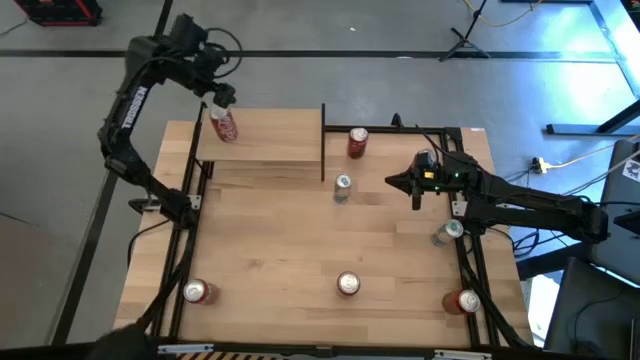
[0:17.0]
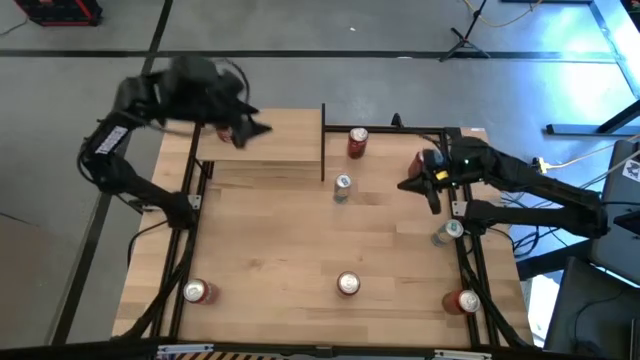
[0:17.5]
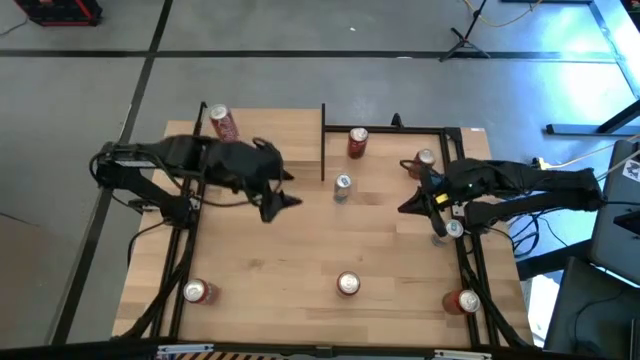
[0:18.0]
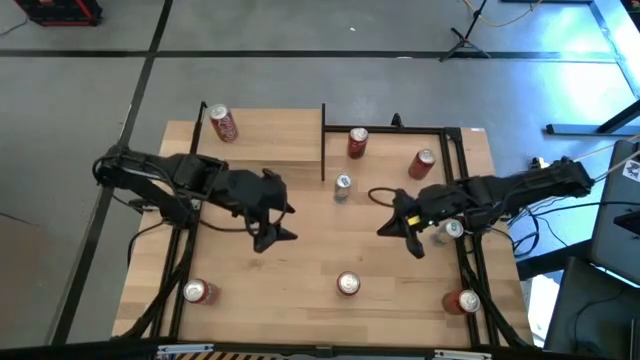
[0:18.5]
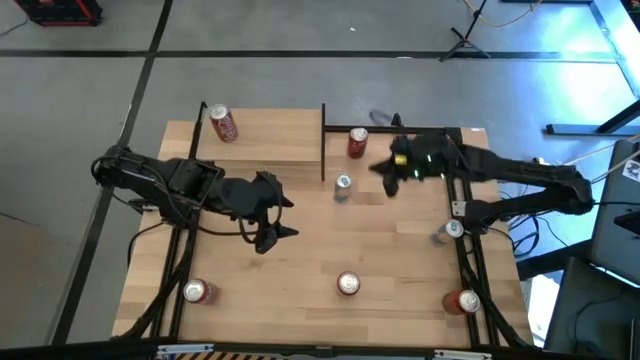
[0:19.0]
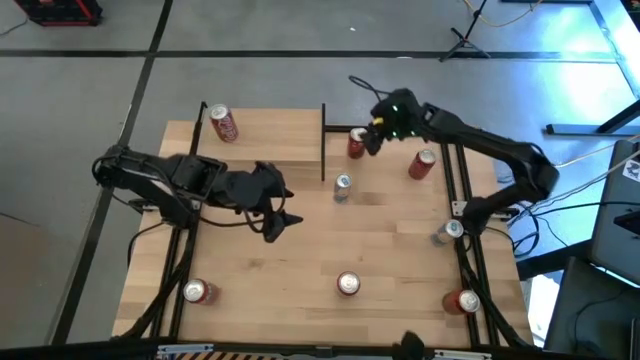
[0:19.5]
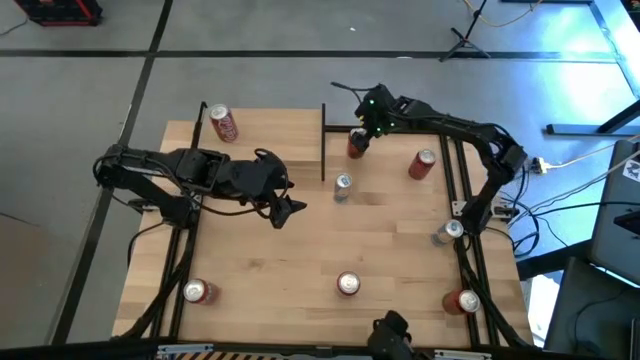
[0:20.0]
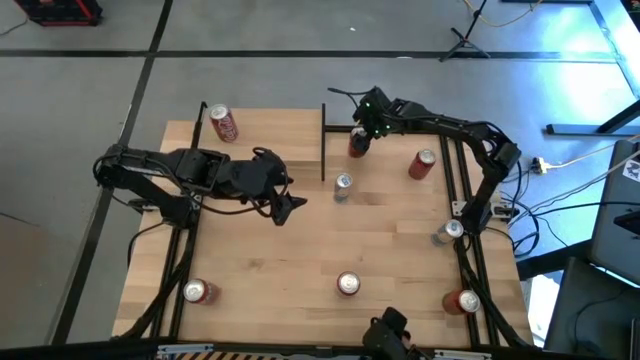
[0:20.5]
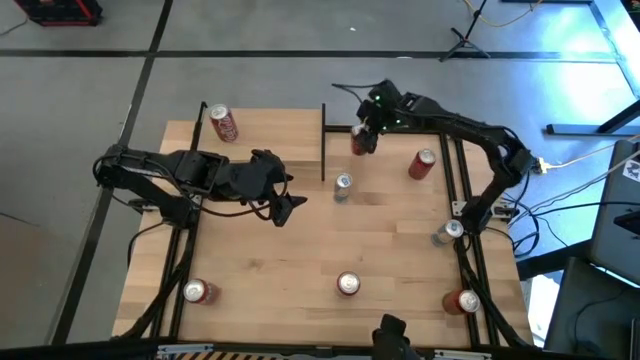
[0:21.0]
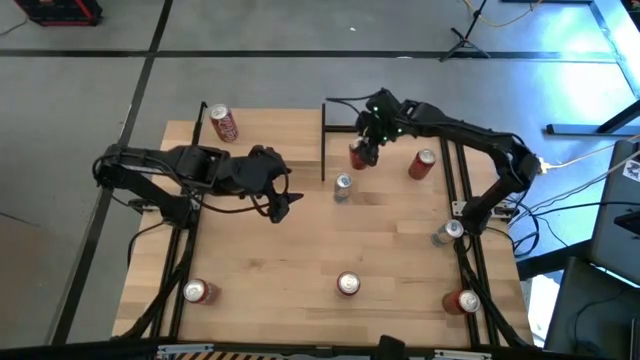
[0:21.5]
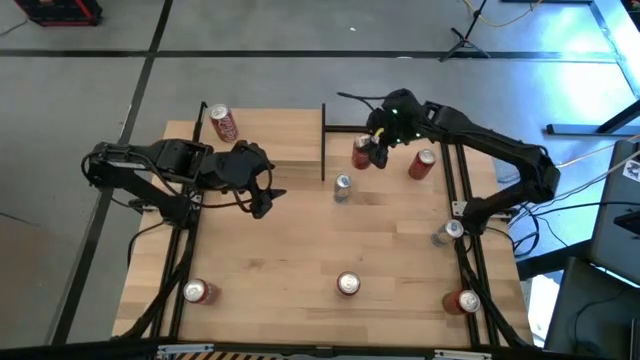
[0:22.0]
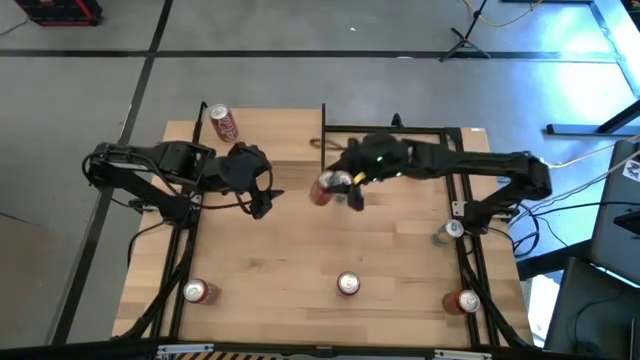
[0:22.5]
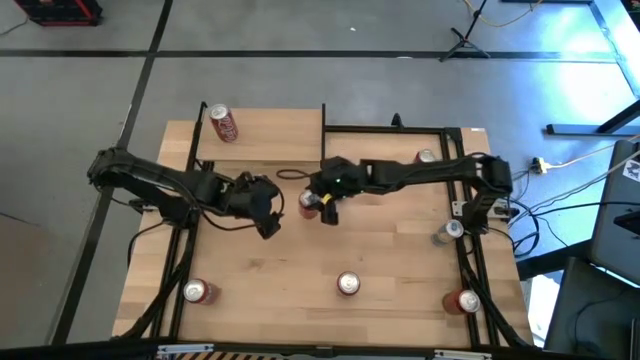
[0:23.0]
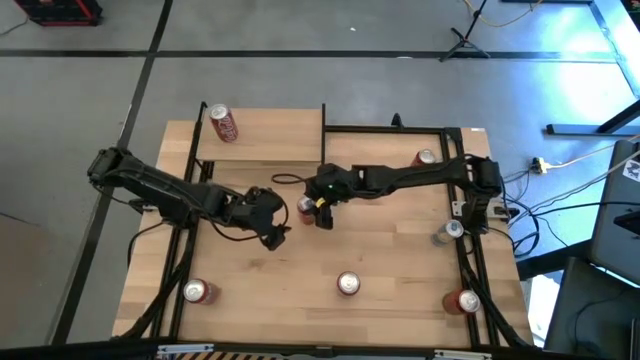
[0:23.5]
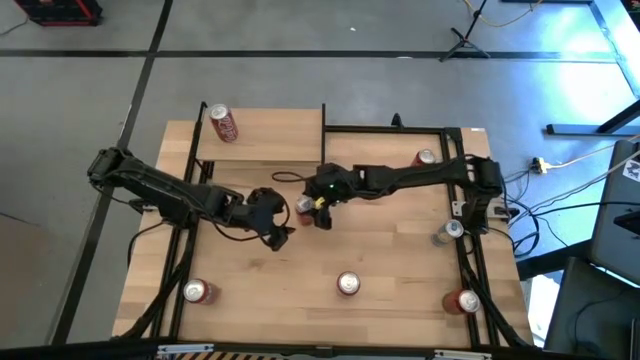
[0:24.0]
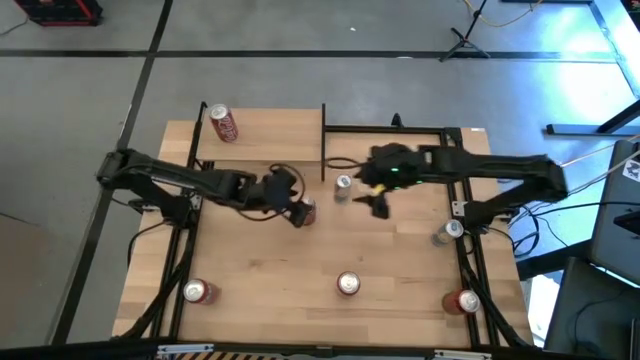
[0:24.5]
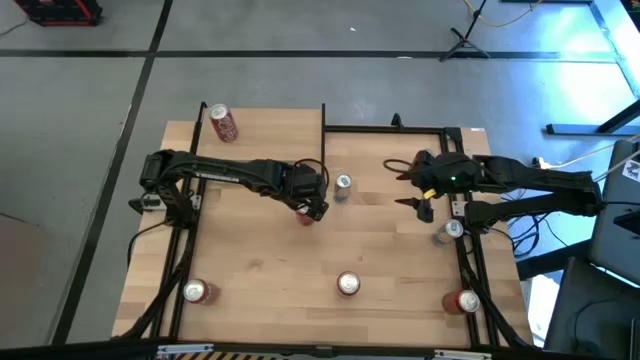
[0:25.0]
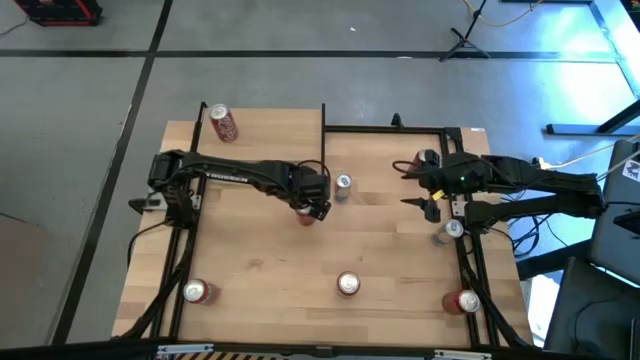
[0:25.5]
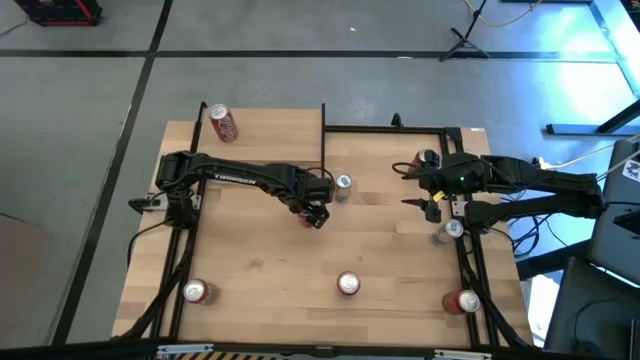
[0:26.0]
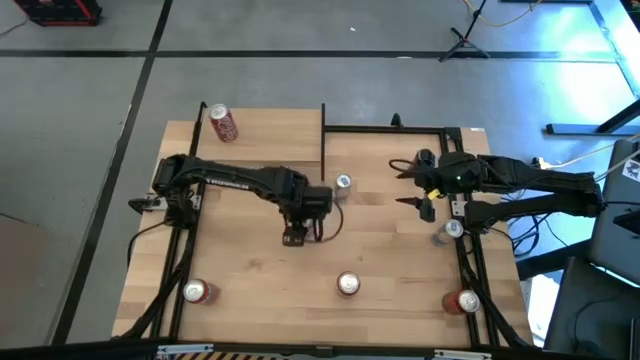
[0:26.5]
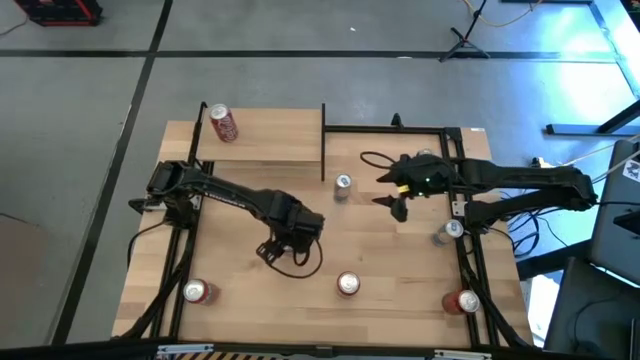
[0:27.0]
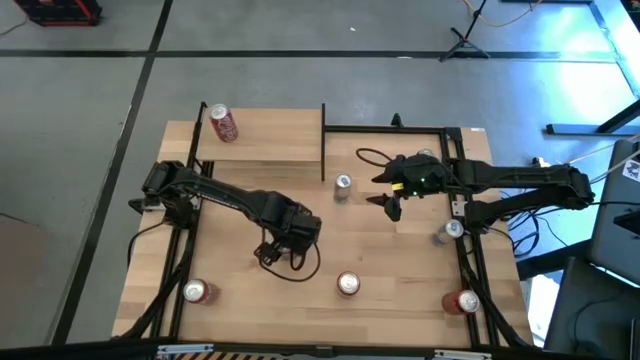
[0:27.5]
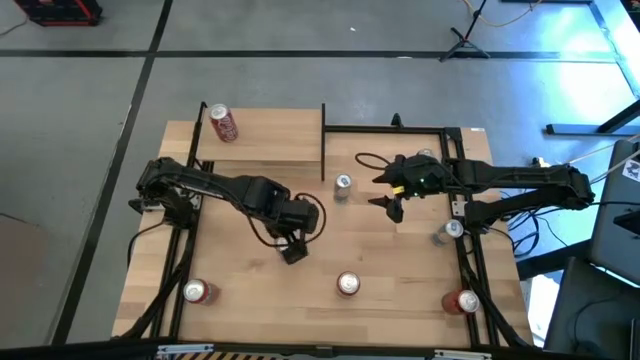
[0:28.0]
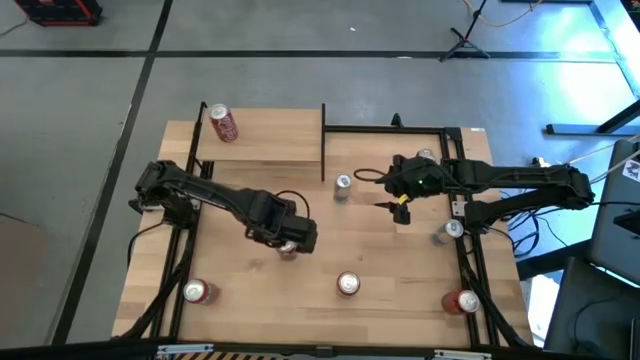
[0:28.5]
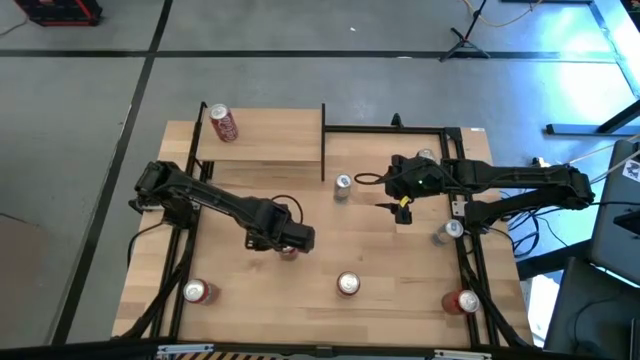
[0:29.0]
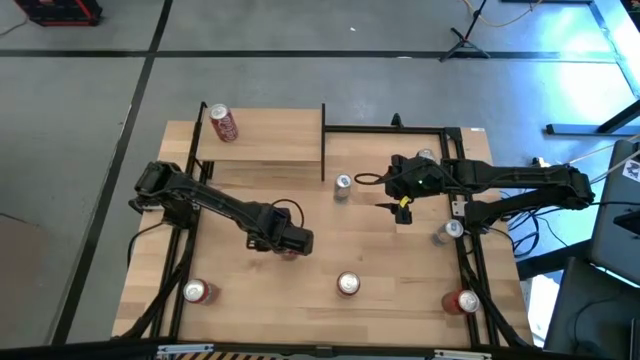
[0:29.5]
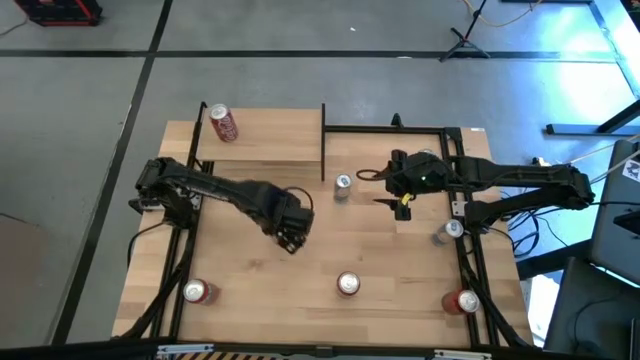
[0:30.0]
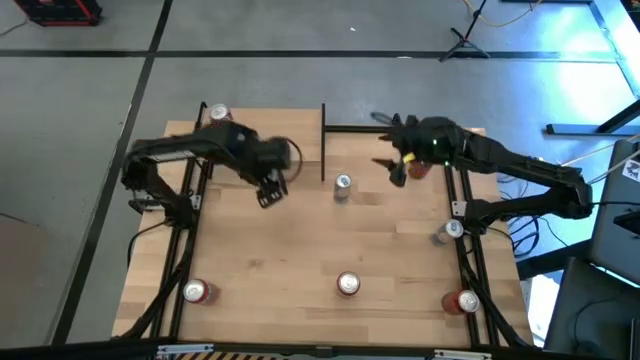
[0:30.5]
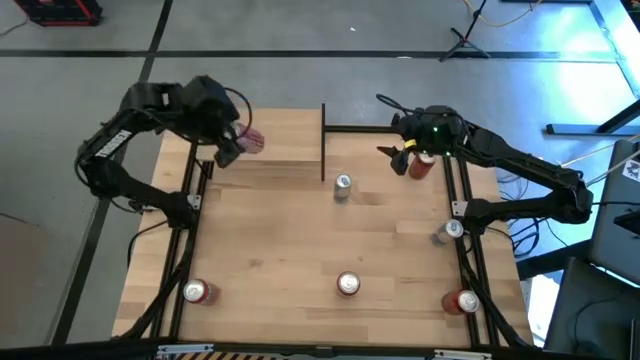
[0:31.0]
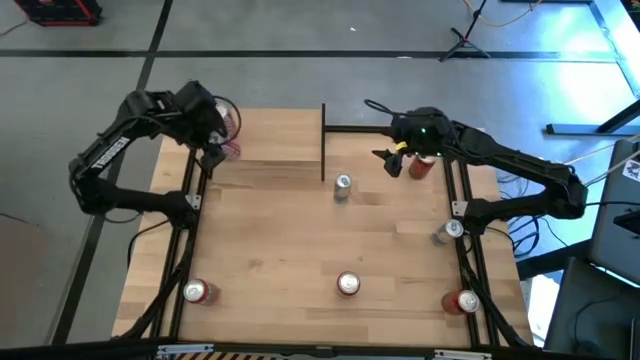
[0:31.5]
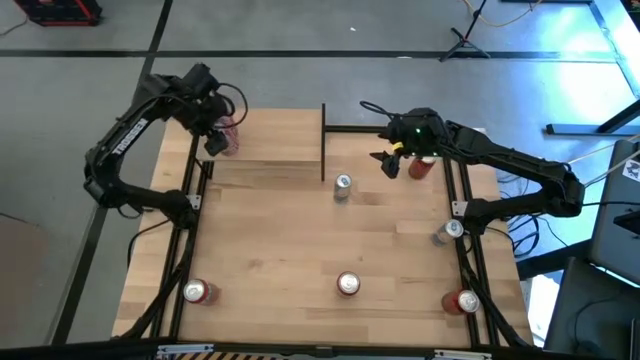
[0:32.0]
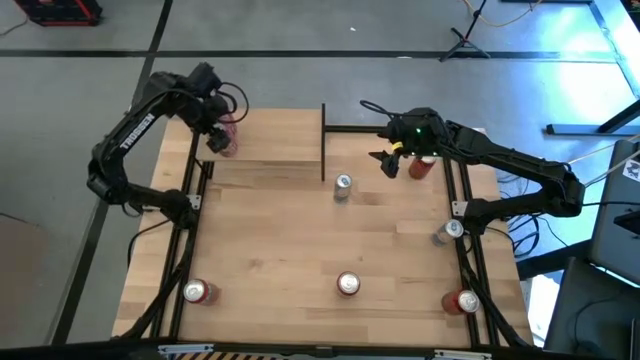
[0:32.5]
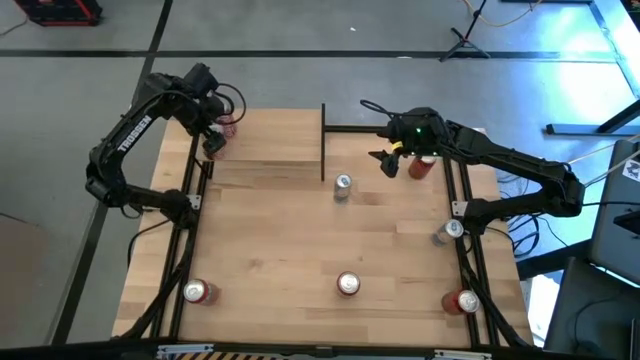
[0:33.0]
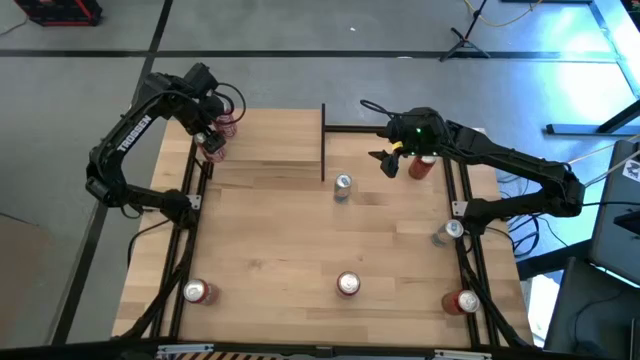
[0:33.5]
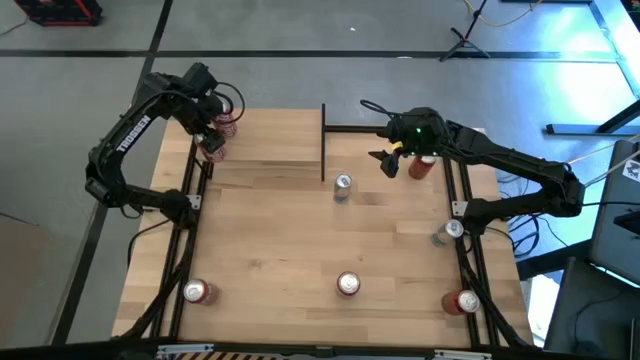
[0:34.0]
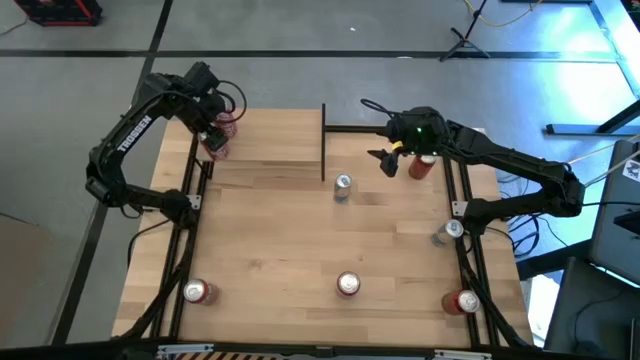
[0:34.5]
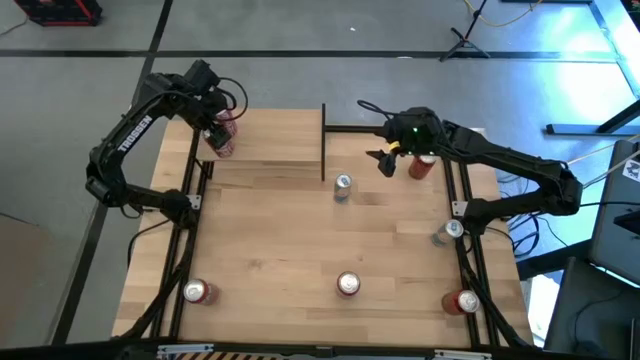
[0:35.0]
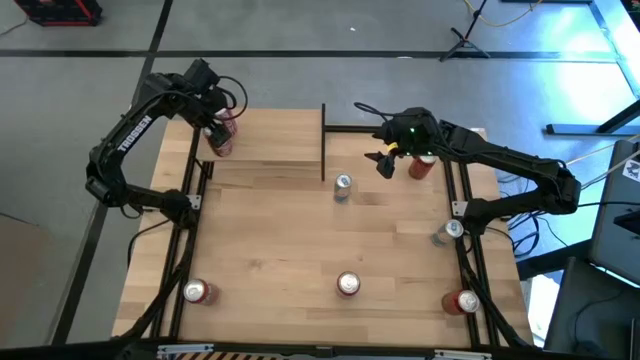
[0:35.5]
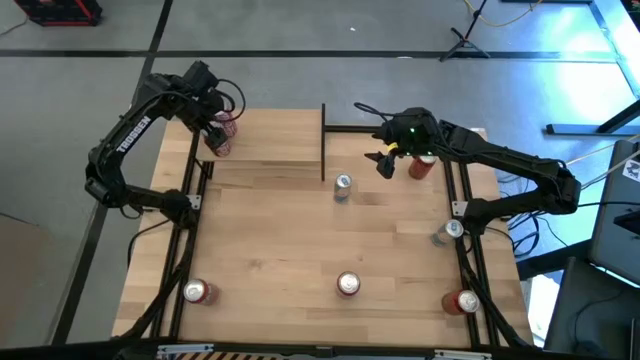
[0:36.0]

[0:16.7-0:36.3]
Task: Place canned beverage on shelf
Put the red and white soda can on the shelf aligned with the other red and white soda can
